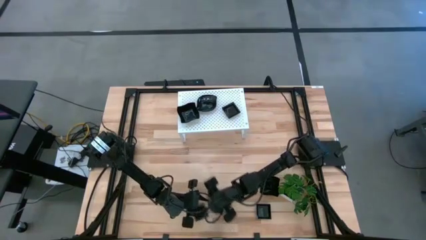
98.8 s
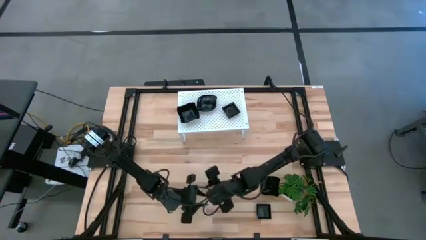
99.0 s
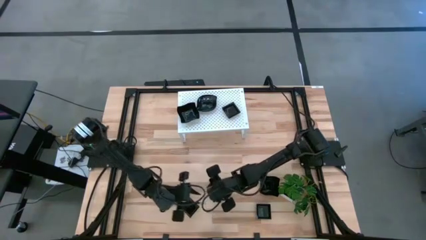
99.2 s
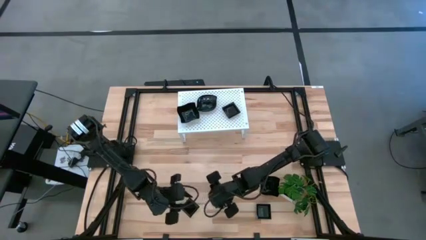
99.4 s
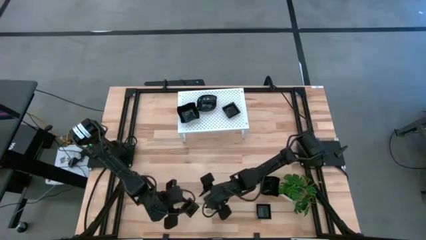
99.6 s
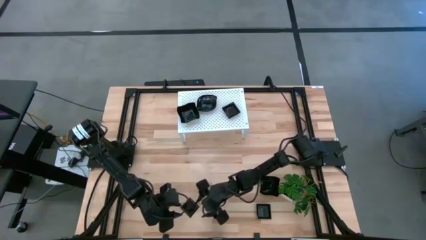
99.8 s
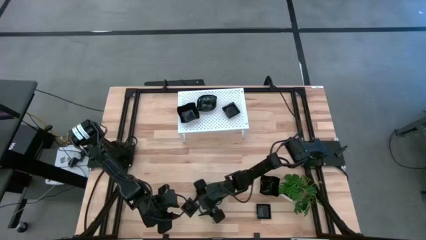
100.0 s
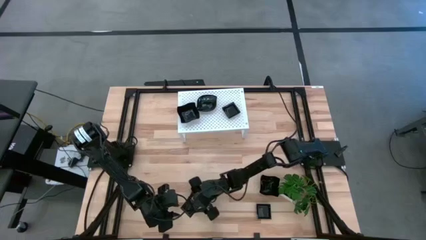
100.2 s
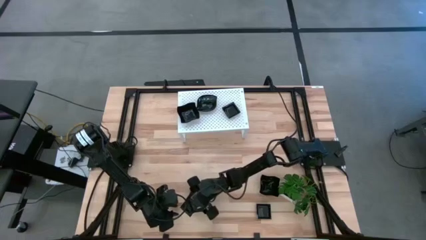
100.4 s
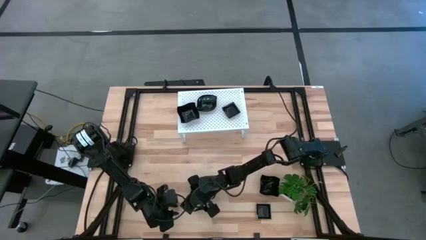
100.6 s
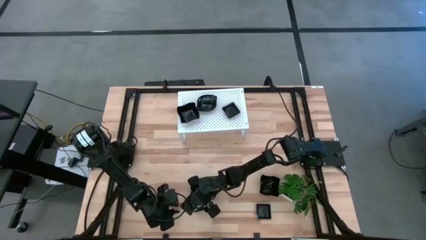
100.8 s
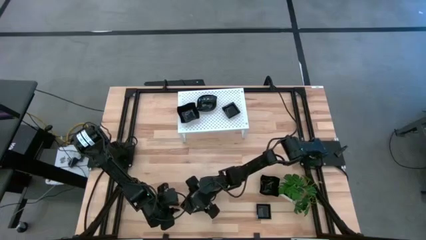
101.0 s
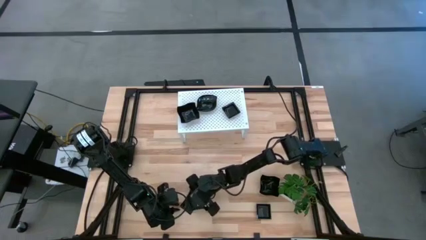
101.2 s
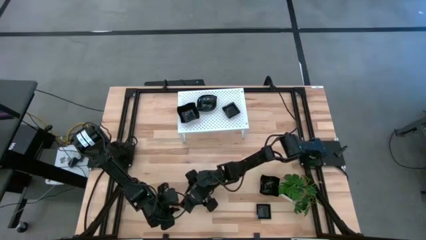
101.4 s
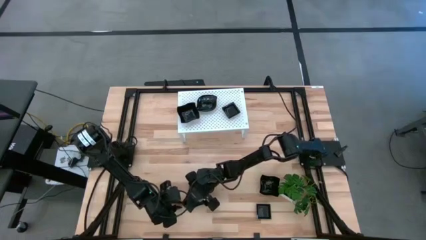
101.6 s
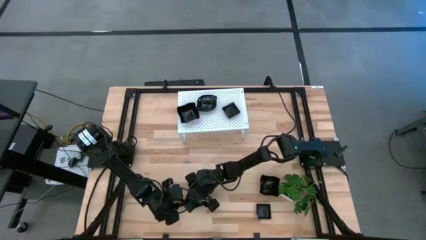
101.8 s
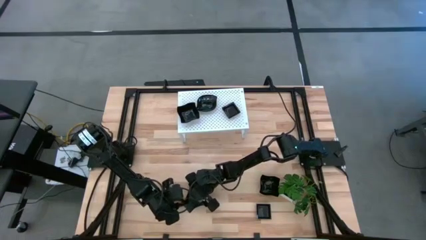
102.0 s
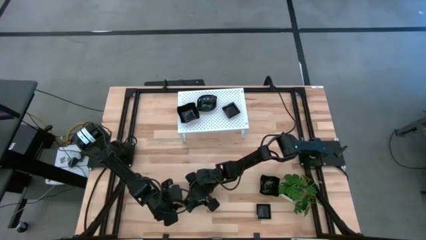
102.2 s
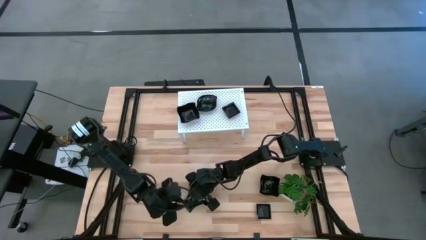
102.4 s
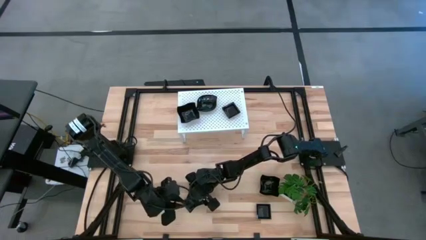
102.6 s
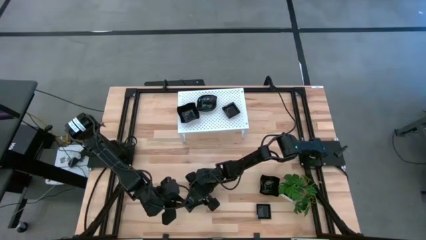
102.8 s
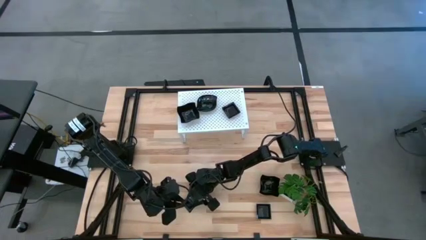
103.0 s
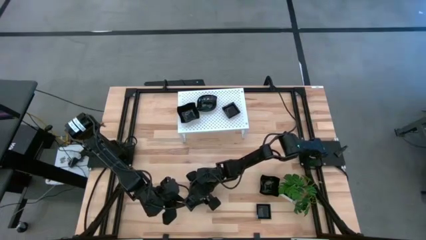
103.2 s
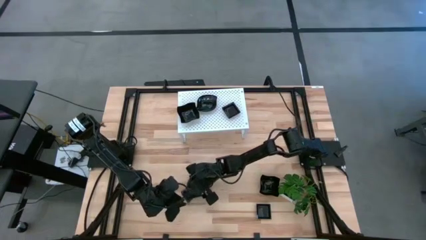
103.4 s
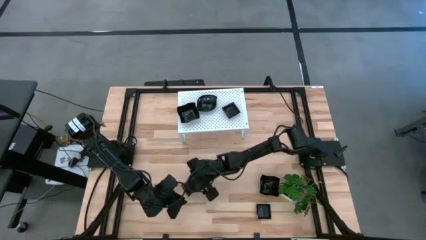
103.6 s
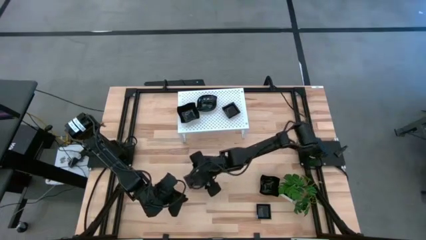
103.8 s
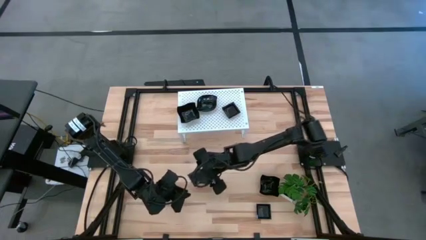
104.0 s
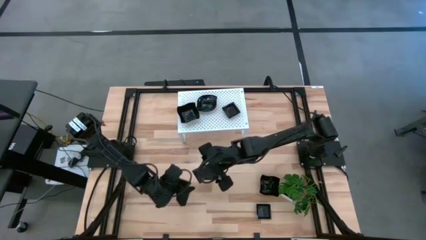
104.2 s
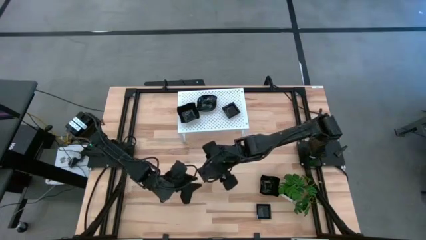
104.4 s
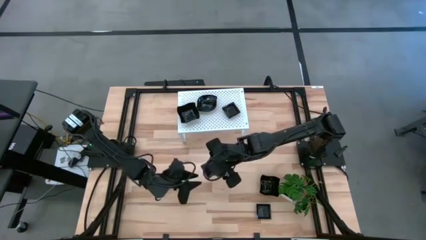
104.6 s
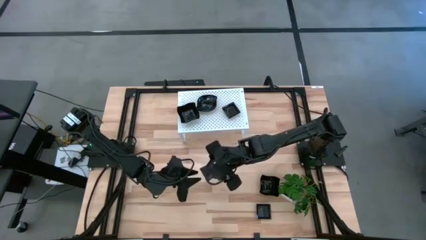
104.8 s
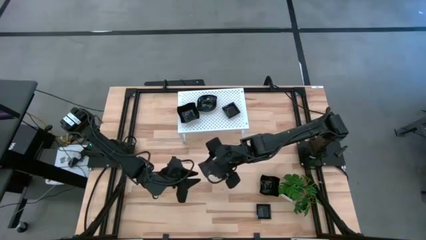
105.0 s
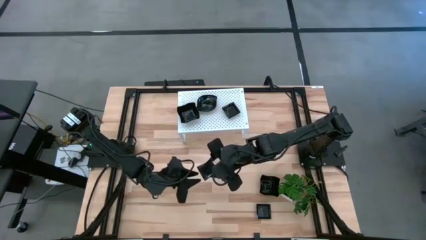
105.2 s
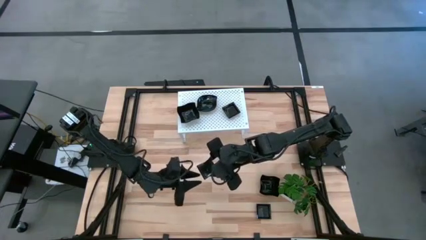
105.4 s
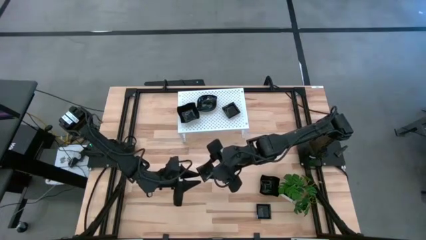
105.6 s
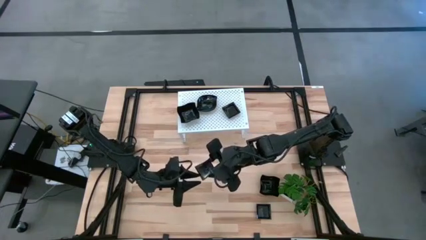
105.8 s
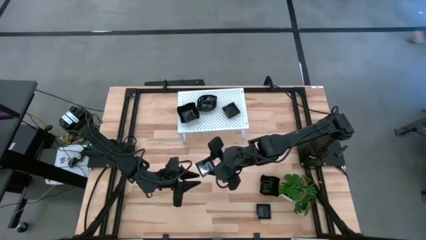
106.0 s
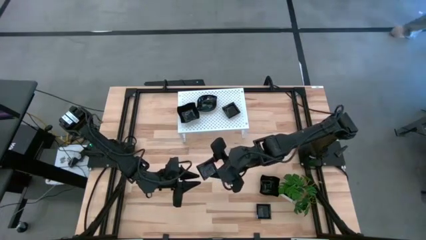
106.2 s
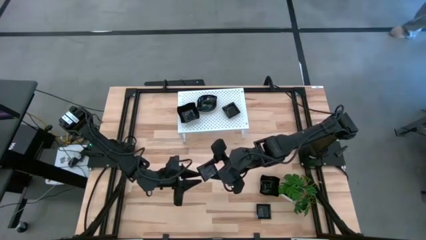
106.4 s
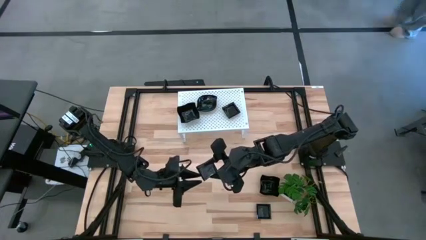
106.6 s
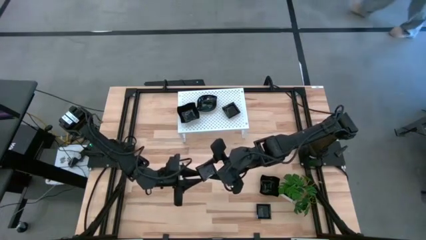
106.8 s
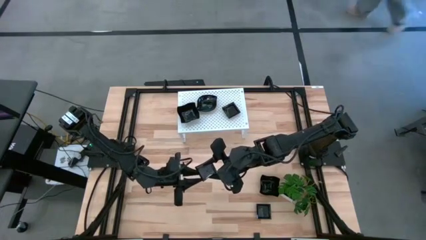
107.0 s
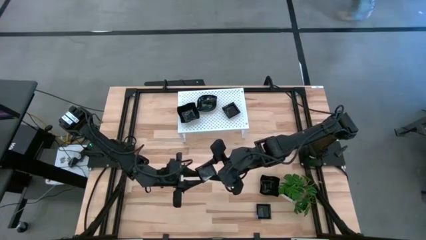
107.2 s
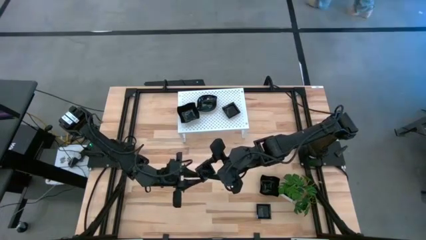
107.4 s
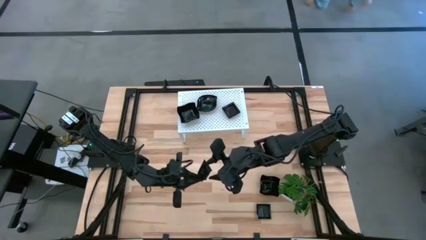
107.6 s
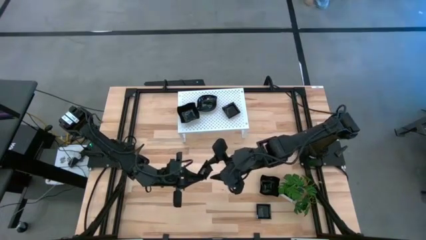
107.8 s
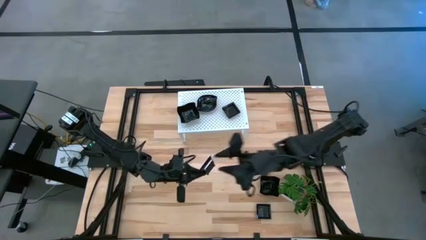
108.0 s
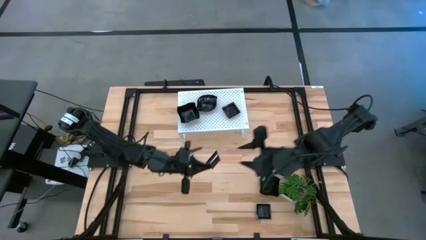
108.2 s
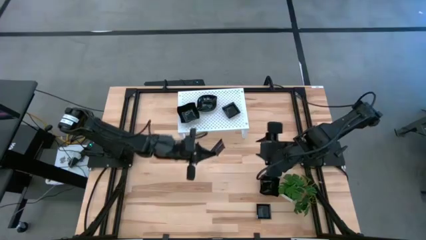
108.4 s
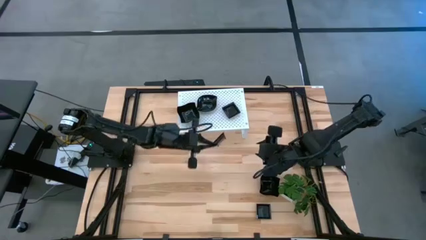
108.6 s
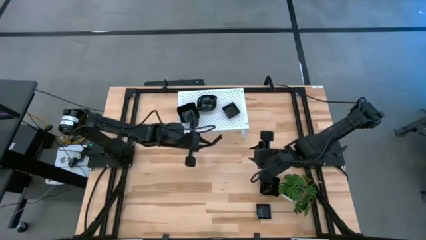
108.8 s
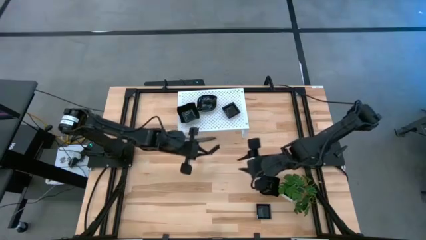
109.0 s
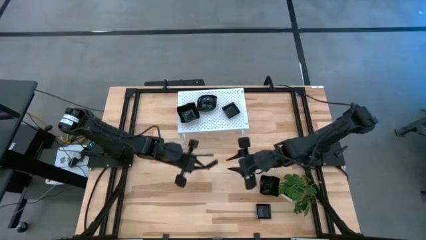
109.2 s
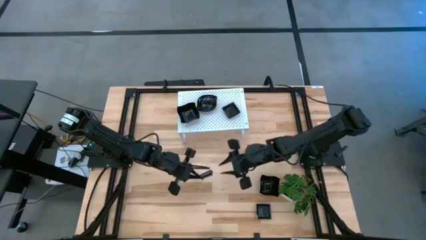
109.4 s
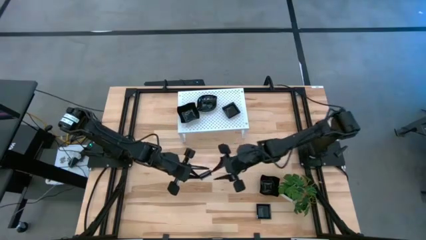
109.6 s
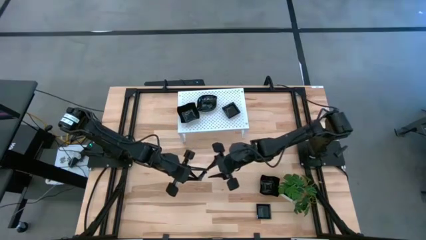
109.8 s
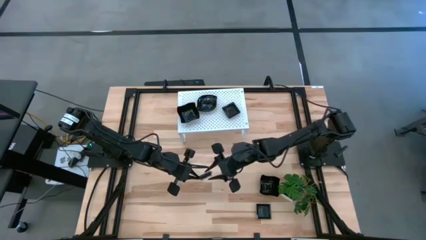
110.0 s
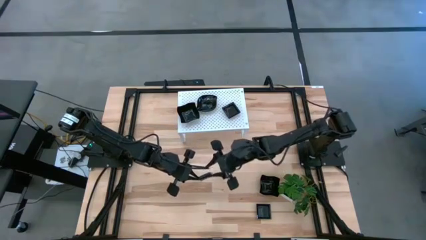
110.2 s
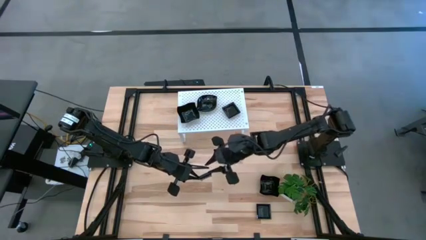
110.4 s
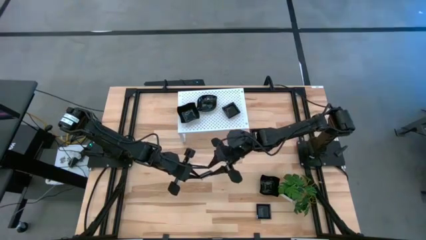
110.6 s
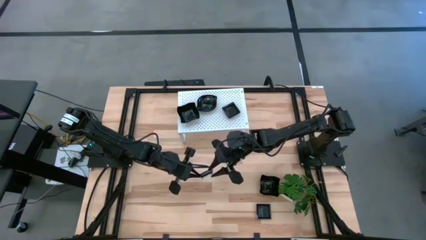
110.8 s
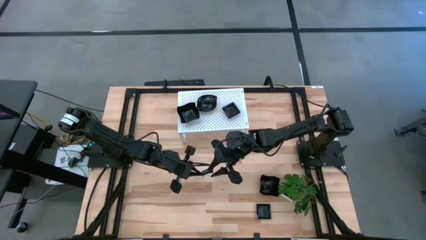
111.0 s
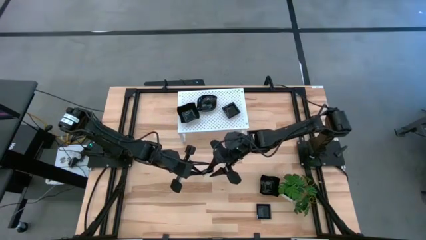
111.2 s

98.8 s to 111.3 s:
Task: Pick & Place Mini shaped plates
Stack the black square plate on top of the black square plate on the shelf

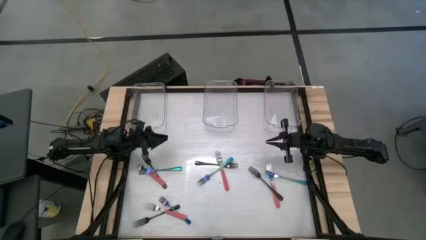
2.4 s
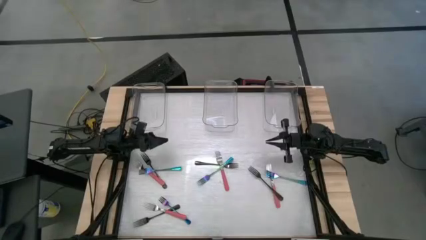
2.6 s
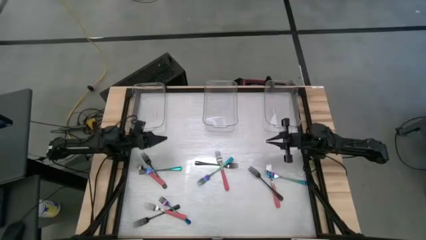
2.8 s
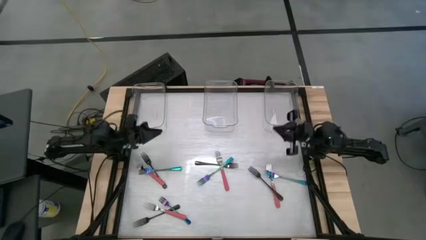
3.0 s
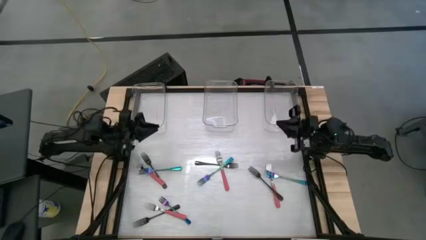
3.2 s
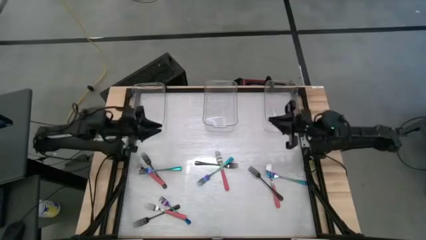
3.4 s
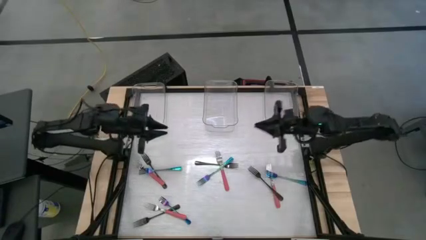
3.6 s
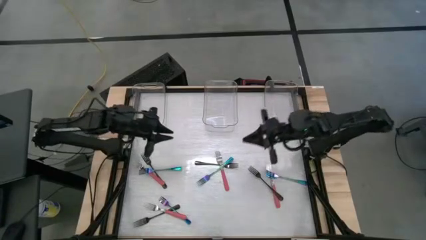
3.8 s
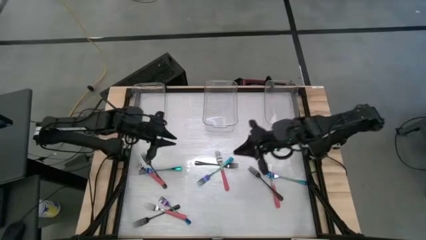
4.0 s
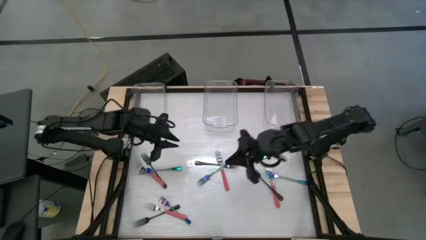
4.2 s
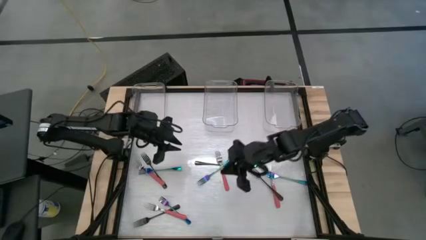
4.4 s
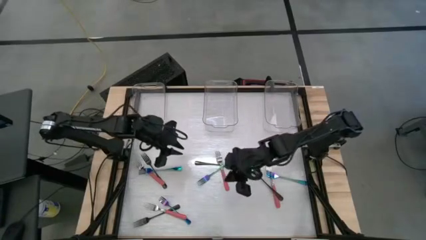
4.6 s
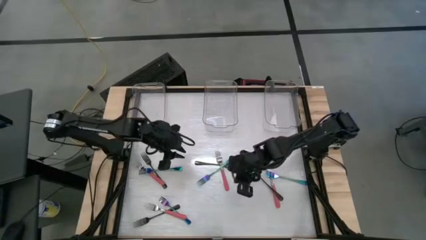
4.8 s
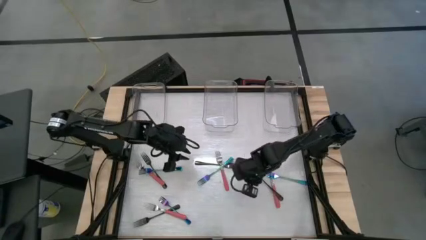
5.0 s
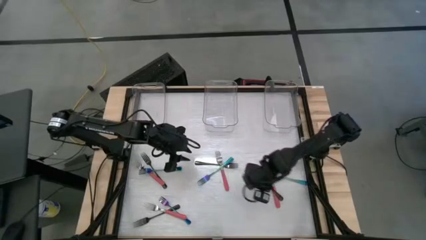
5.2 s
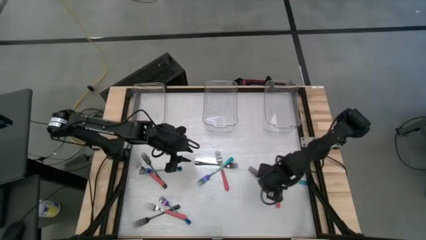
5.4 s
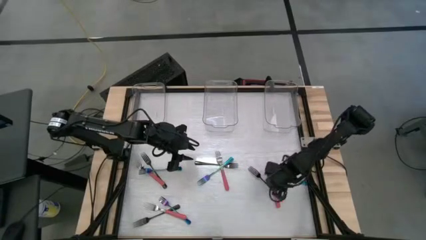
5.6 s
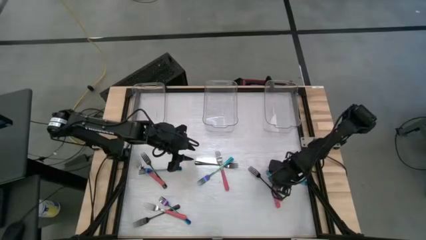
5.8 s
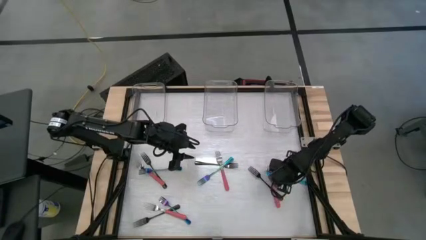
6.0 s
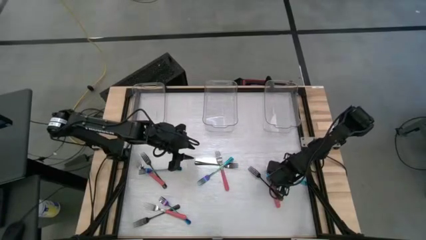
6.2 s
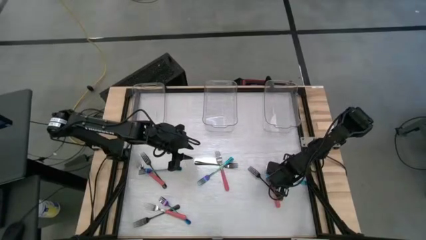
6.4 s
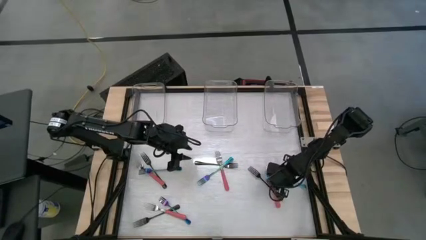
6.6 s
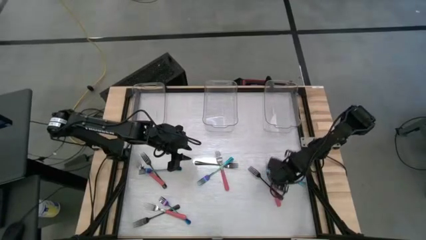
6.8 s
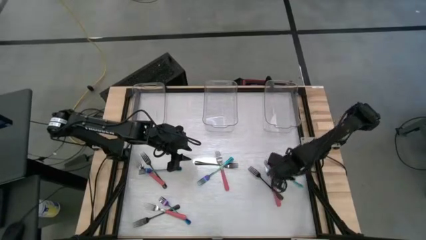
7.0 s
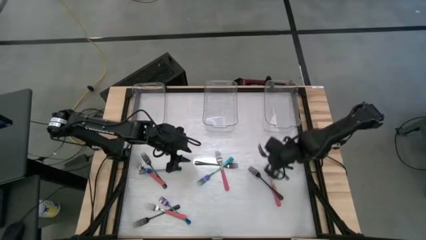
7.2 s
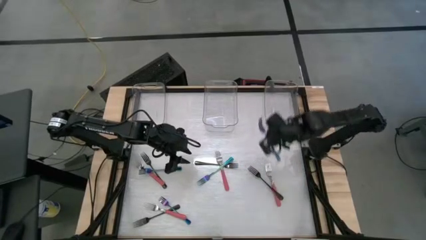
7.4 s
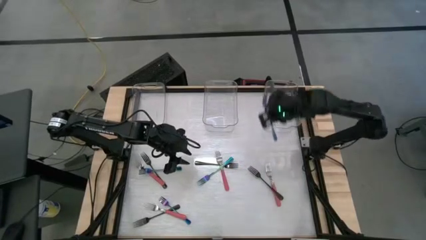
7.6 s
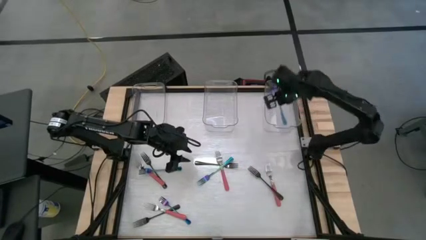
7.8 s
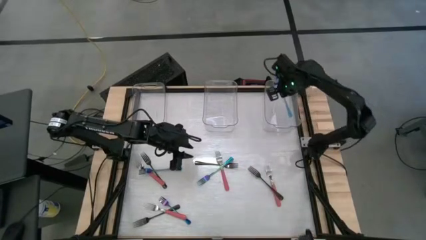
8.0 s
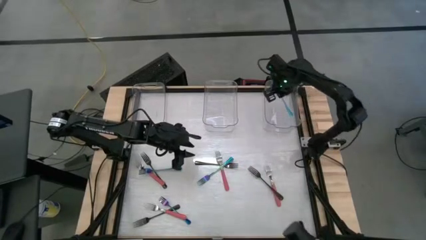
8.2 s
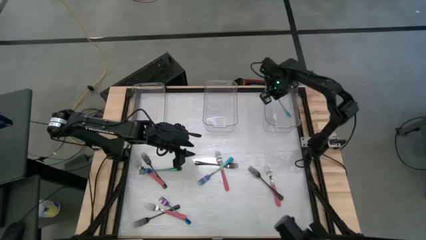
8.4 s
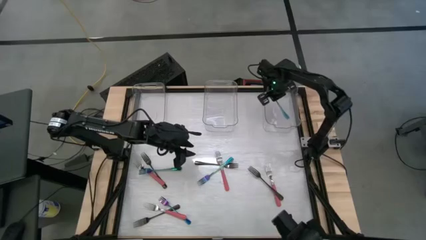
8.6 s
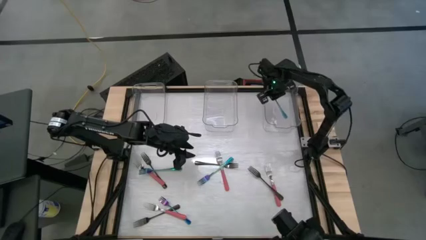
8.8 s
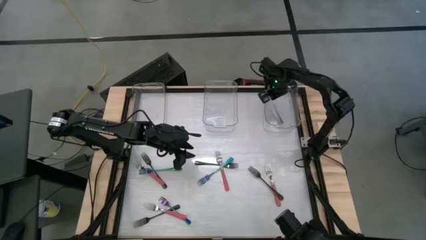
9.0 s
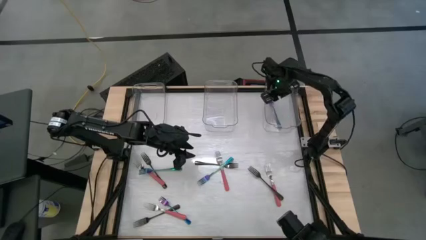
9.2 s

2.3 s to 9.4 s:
Task: Sort silverware by color (type)
Put the top right iridescent fork into the right transparent bin
